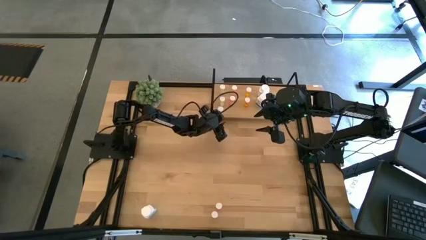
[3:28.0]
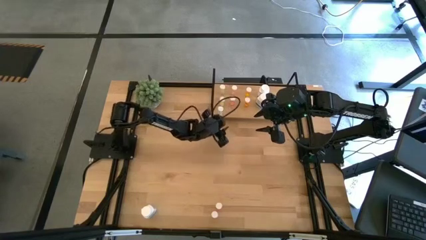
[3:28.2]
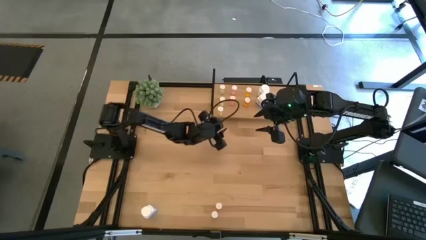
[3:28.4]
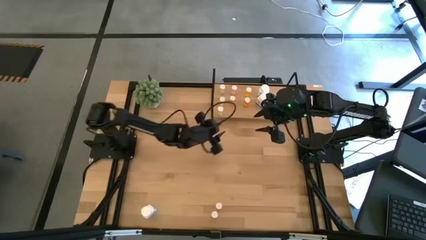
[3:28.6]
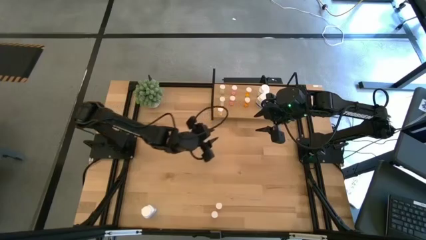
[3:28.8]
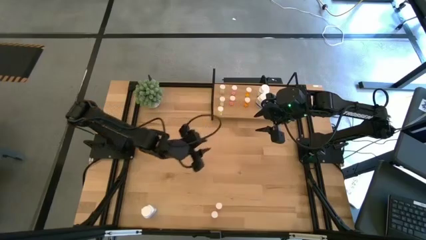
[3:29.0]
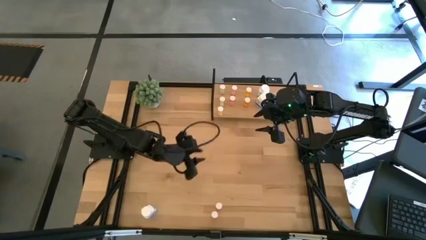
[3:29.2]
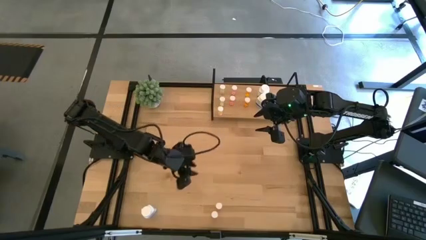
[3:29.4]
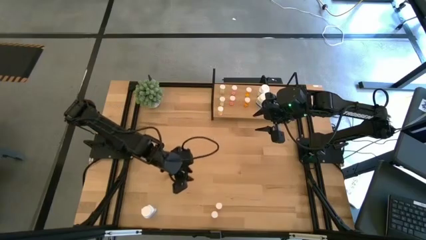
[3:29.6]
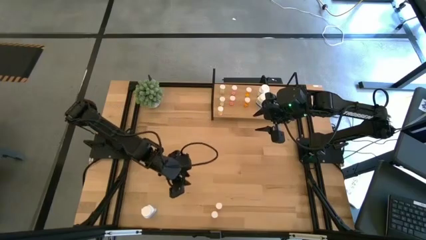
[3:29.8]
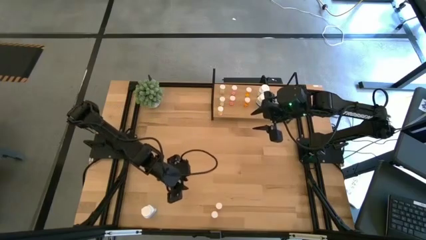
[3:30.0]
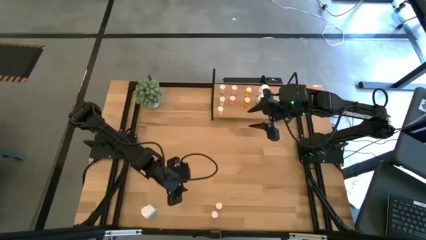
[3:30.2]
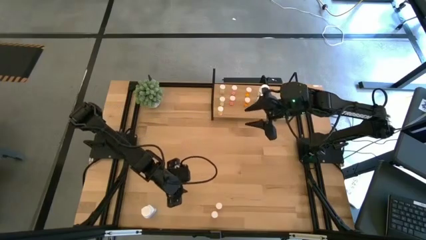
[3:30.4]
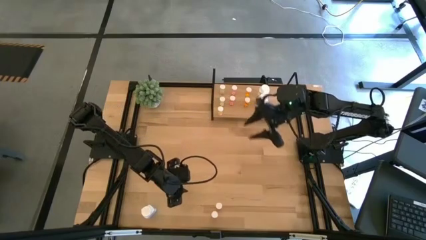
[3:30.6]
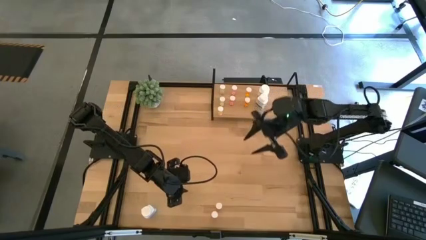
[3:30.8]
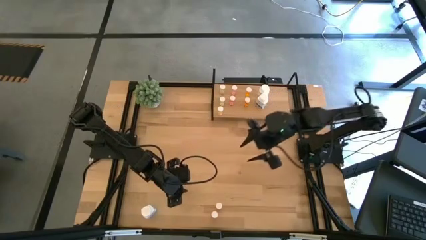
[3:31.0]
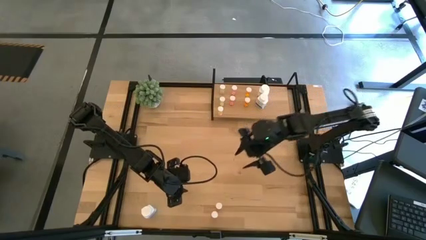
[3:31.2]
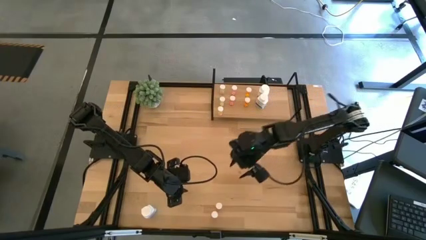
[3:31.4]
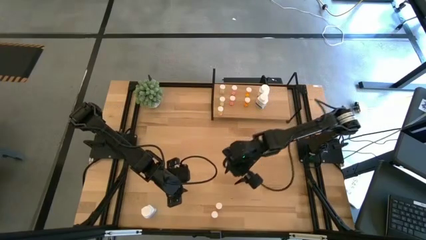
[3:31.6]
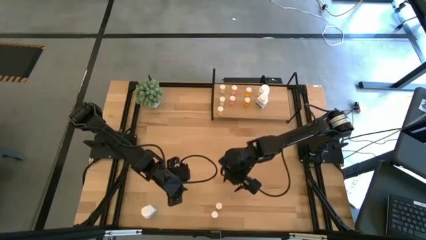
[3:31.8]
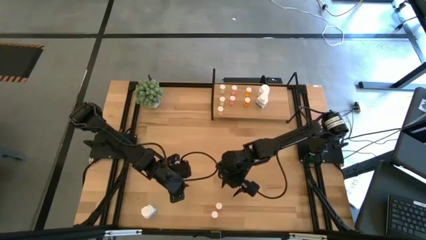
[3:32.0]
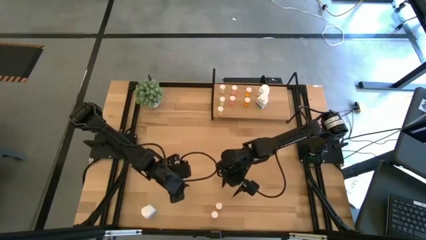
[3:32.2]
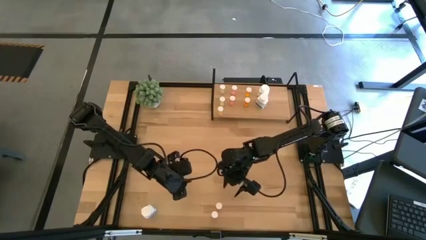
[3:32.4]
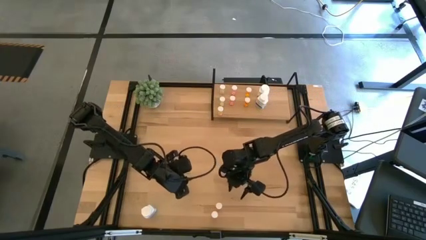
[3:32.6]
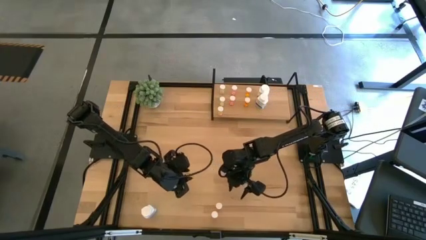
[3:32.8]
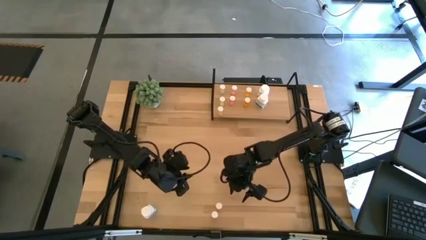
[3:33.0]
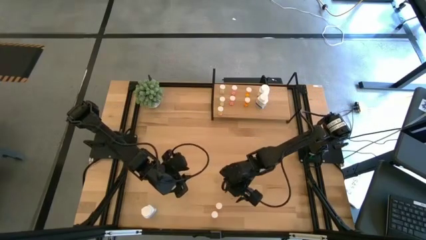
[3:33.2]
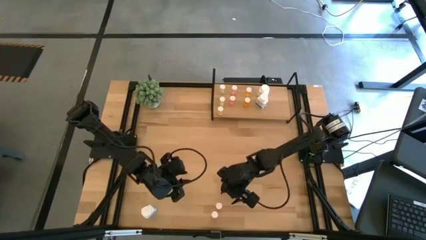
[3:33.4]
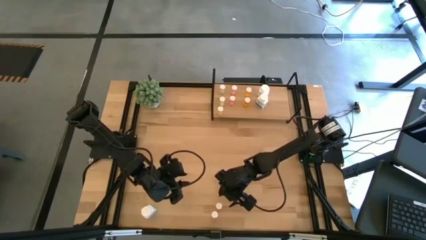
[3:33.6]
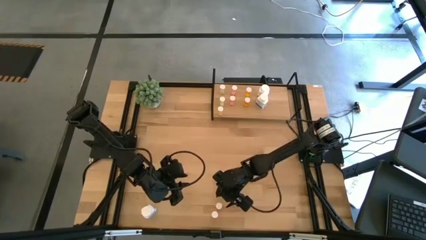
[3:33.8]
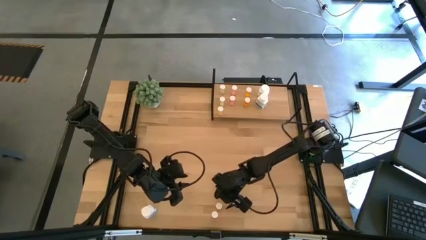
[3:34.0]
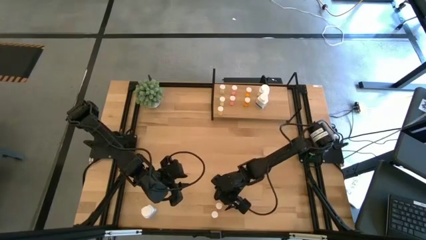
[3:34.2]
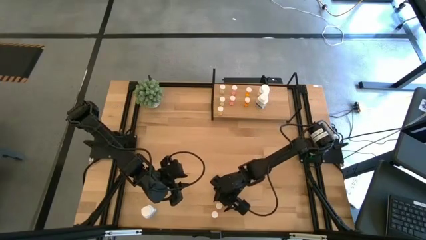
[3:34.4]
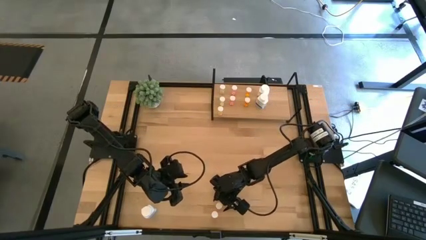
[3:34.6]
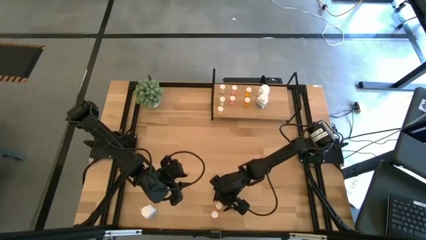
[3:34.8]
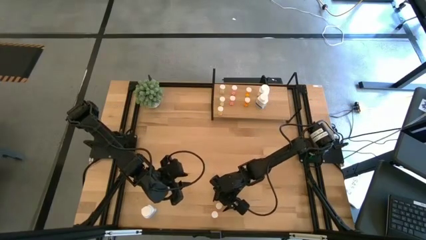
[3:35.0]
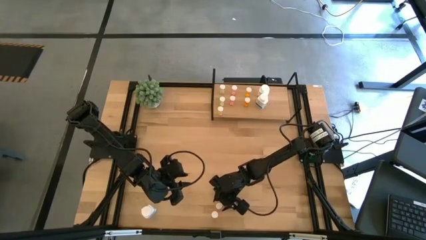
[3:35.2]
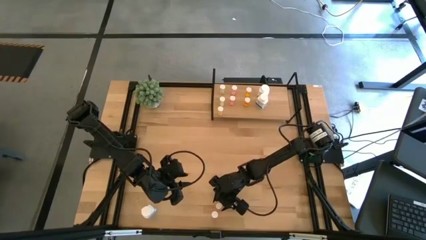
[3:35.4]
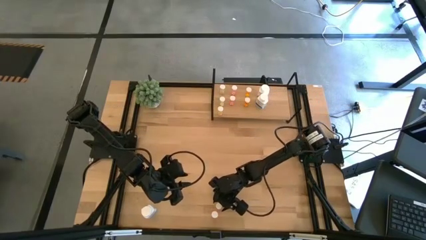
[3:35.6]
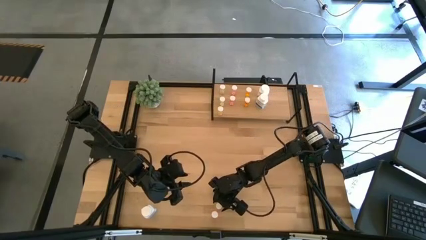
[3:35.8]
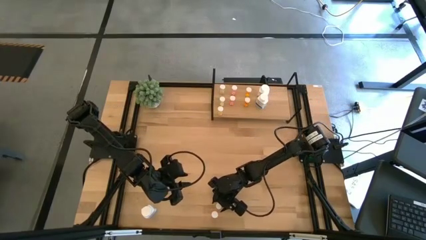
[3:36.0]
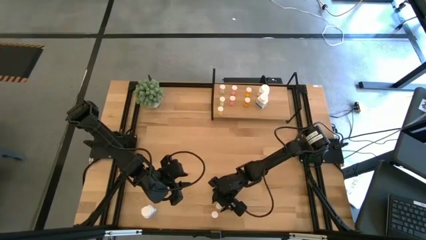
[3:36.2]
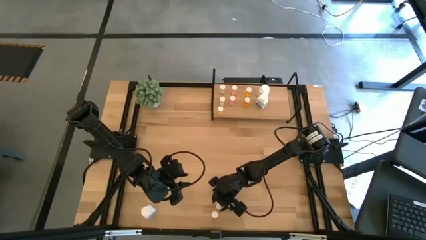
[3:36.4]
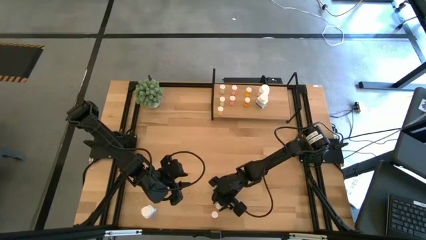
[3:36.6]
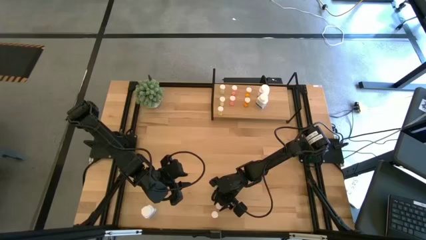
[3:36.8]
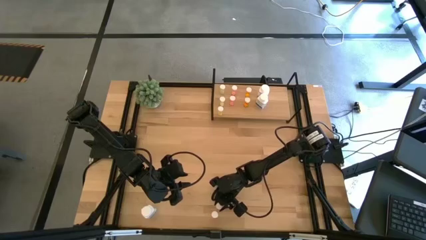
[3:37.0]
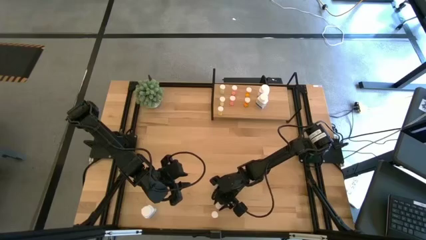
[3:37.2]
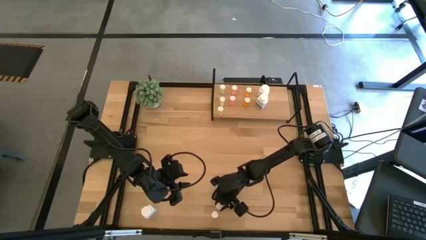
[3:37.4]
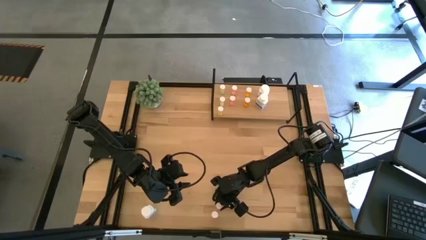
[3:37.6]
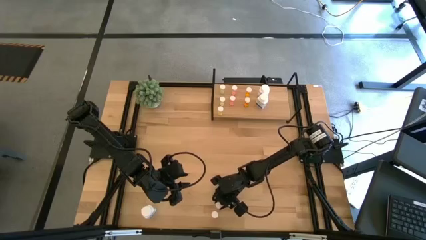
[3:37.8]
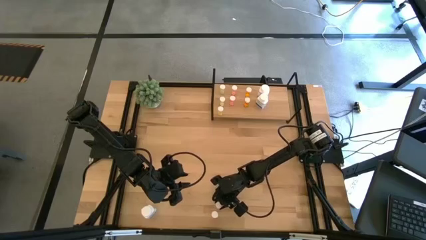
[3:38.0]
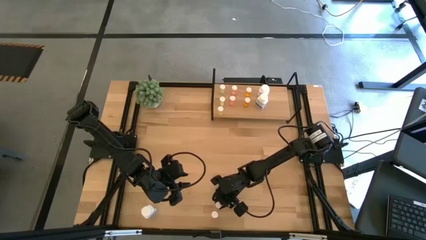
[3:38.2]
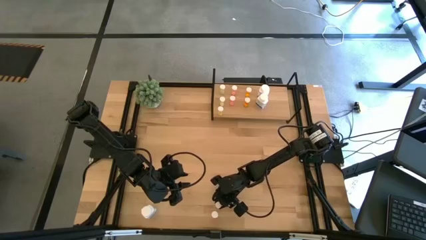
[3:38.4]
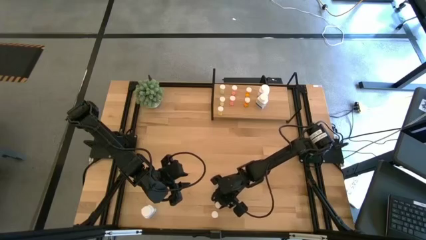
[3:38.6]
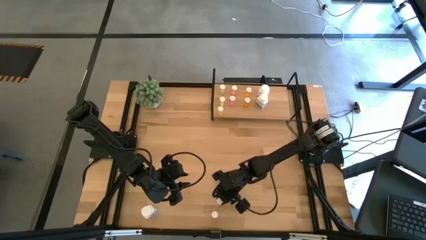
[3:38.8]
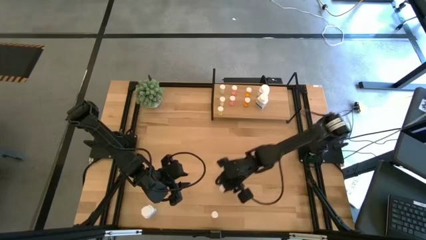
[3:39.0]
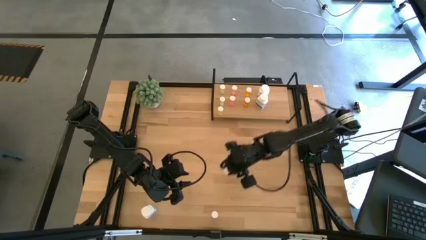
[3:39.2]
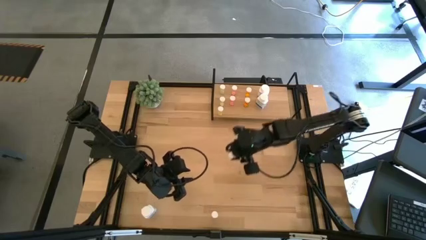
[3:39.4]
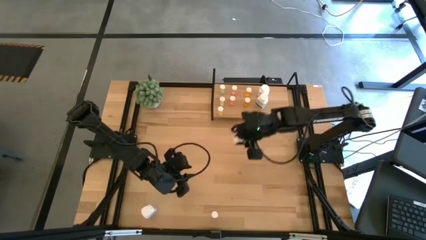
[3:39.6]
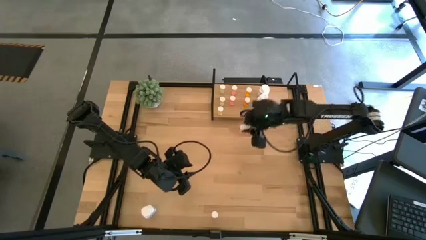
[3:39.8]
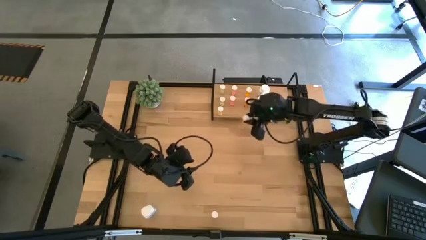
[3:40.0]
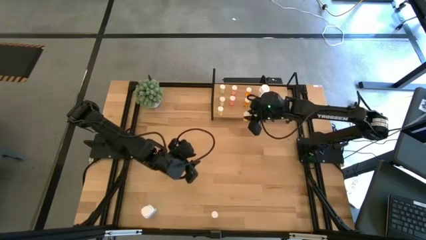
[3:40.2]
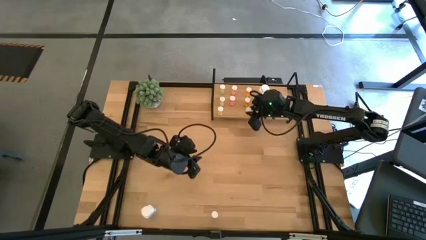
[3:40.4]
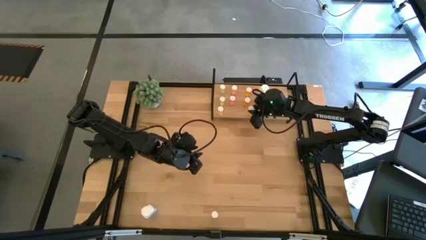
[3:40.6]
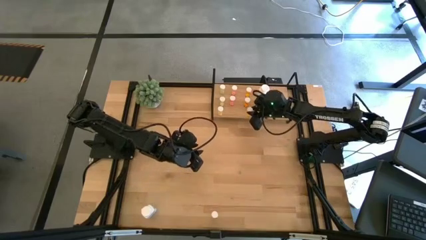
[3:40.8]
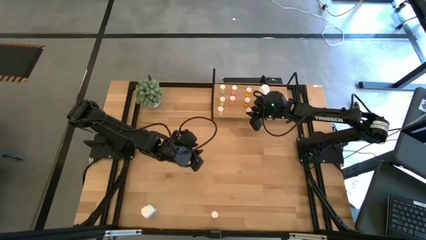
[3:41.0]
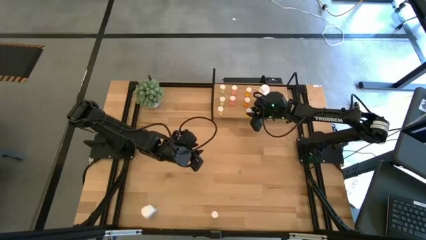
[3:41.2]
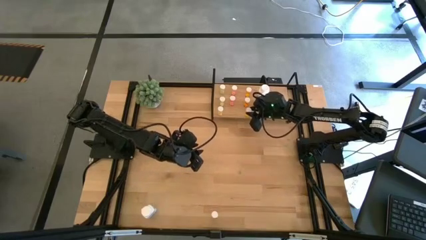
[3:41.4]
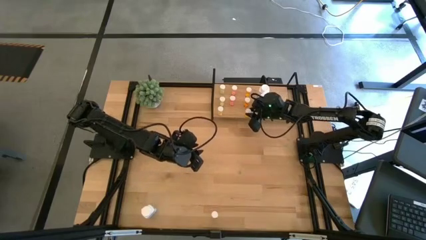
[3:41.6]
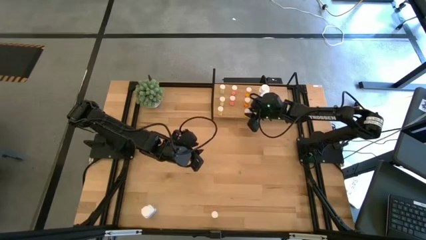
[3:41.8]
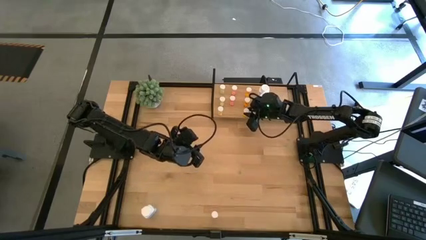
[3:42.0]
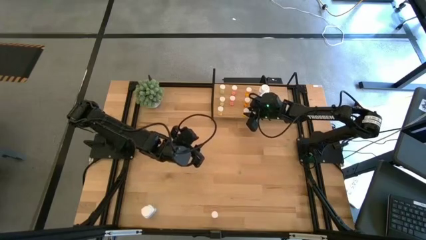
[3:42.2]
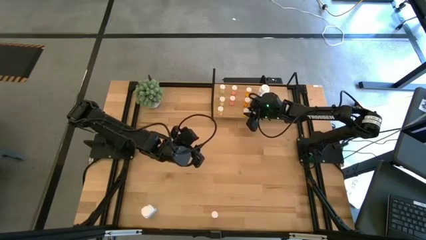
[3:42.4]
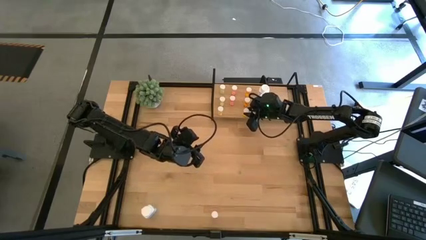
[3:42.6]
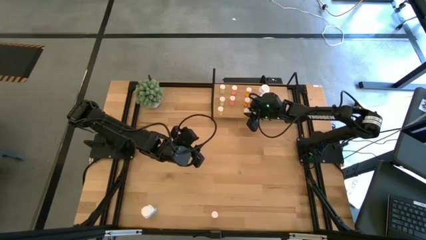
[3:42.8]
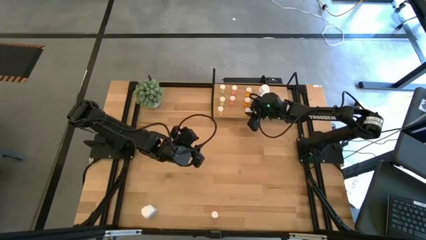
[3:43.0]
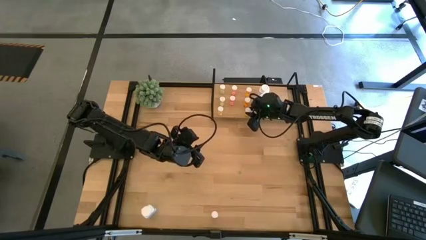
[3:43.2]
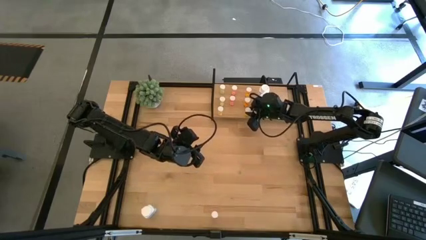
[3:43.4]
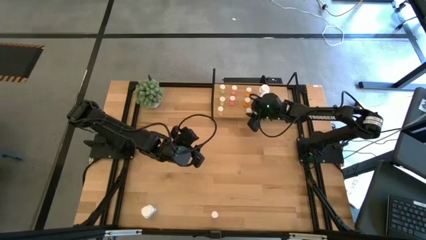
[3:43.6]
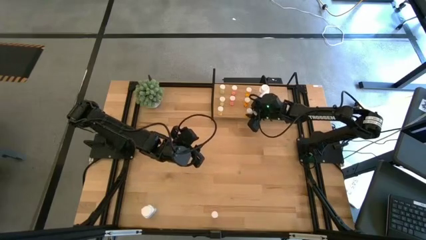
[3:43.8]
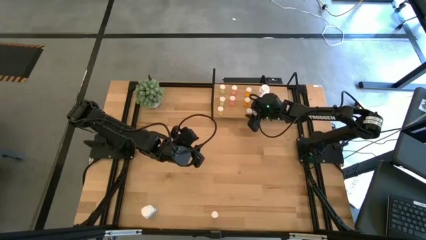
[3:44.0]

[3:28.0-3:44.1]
Task: Pick and place medicine bottles onto shelf by color
Put the orange pill bottle on the shelf aligned with the other orange pill bottles
